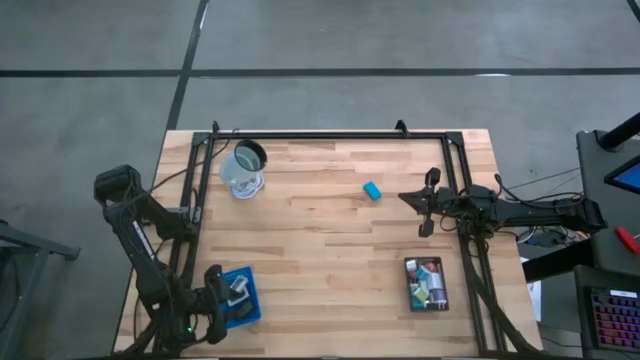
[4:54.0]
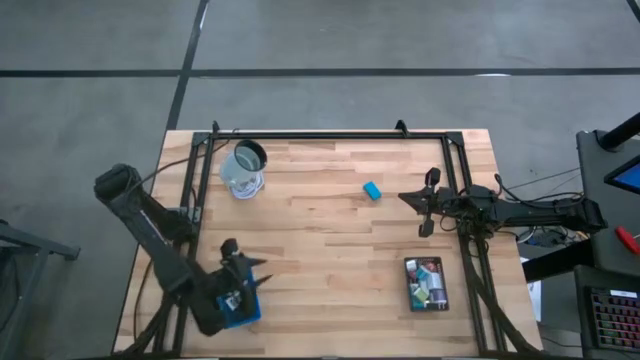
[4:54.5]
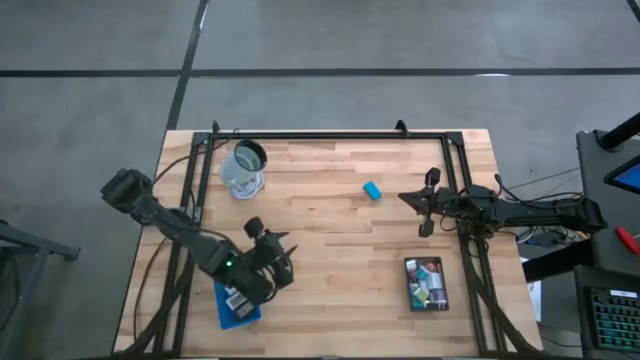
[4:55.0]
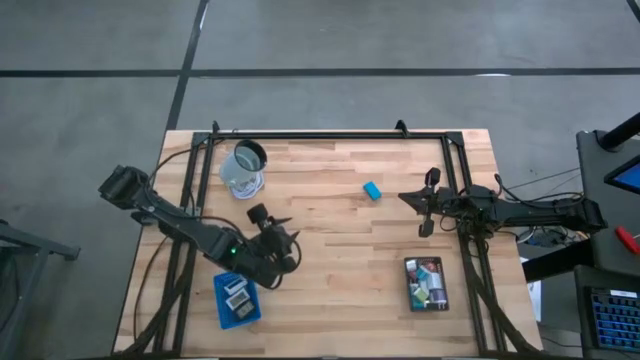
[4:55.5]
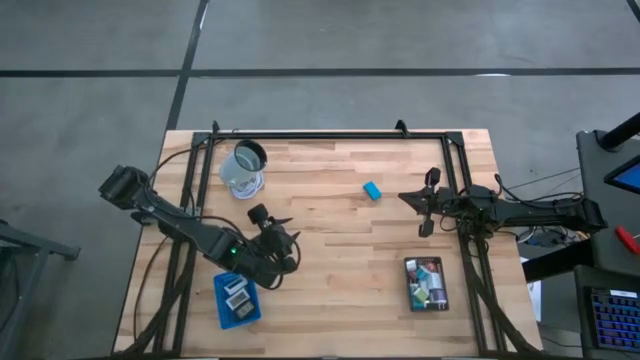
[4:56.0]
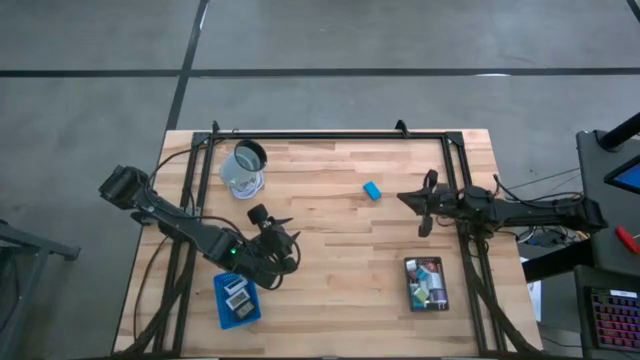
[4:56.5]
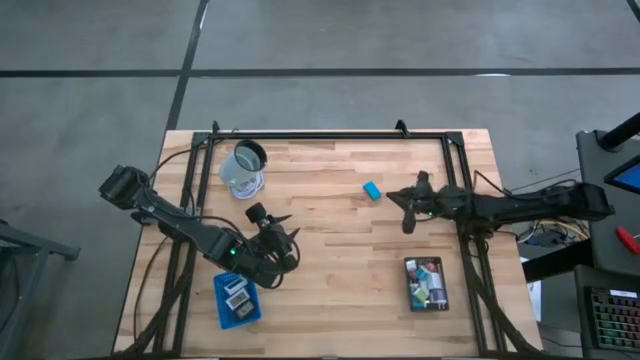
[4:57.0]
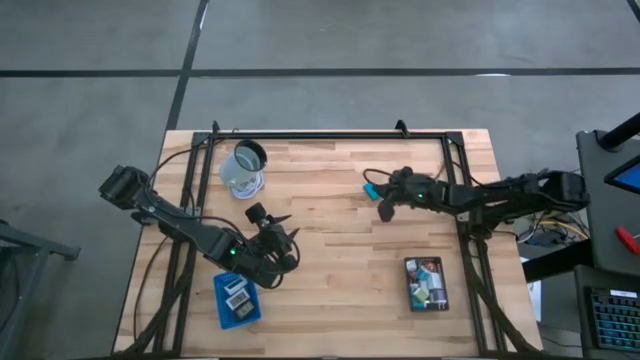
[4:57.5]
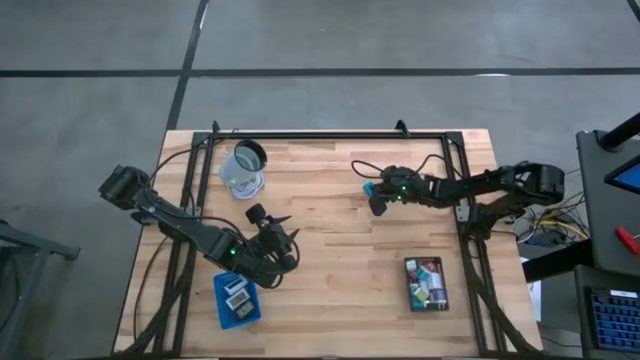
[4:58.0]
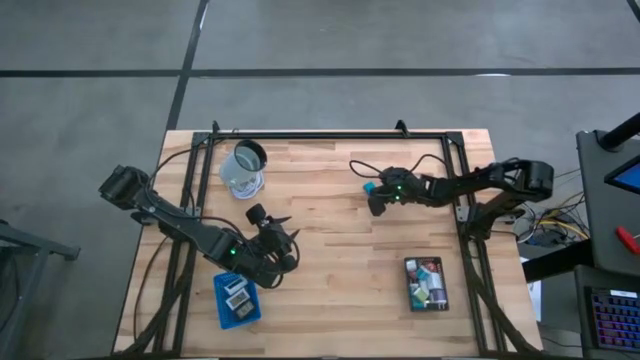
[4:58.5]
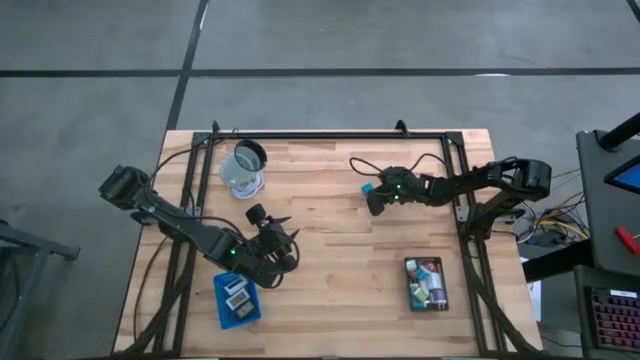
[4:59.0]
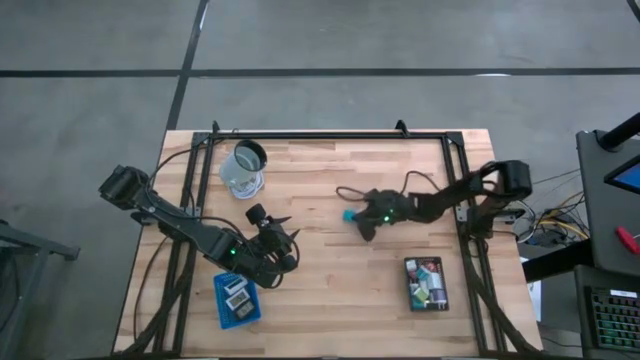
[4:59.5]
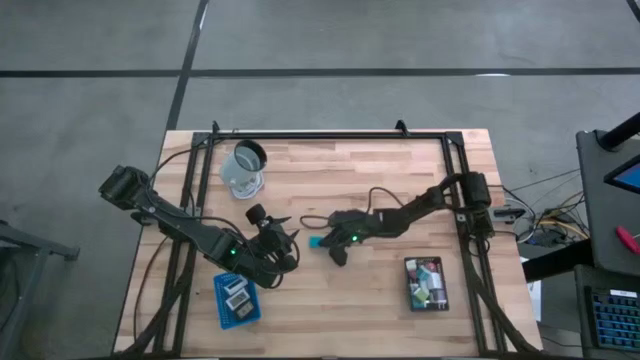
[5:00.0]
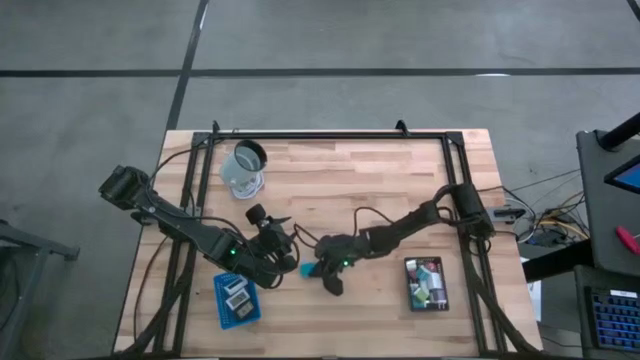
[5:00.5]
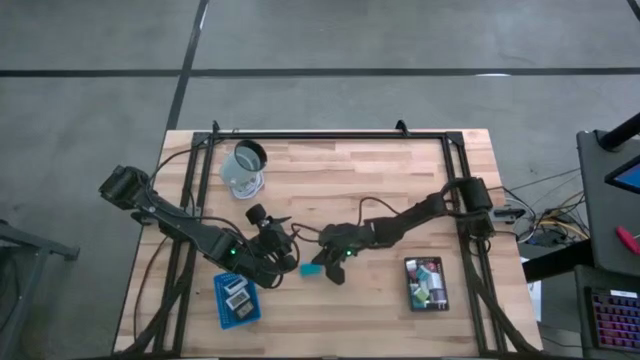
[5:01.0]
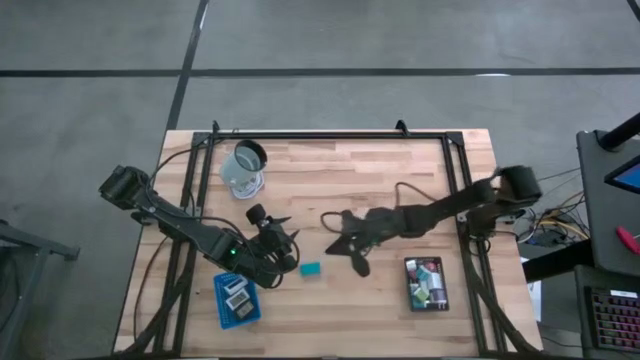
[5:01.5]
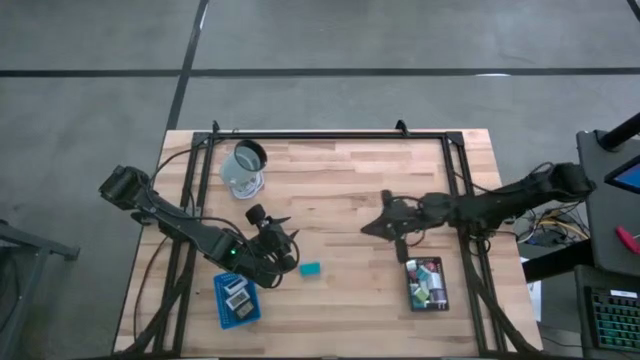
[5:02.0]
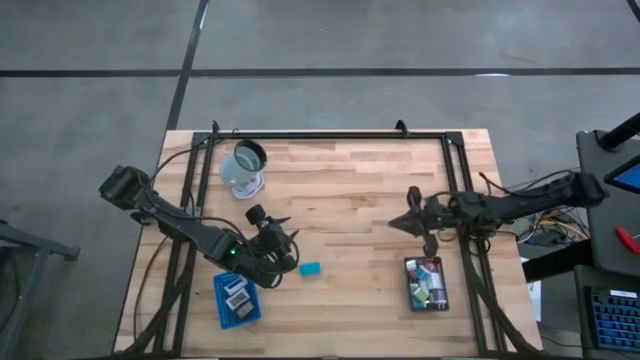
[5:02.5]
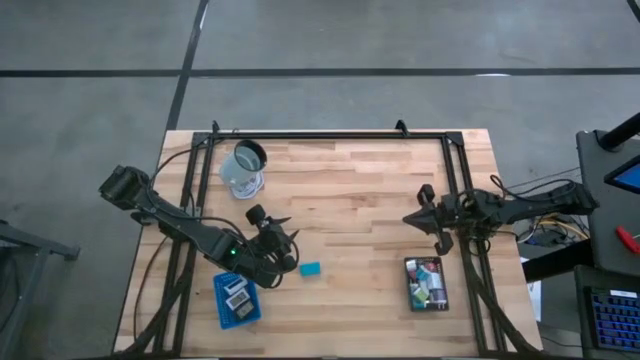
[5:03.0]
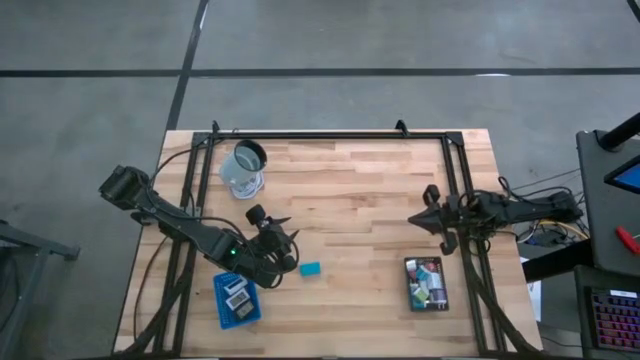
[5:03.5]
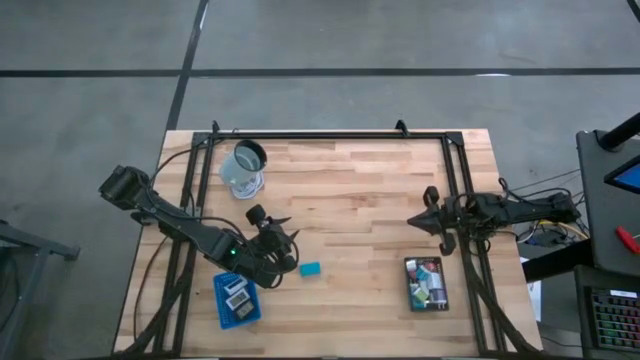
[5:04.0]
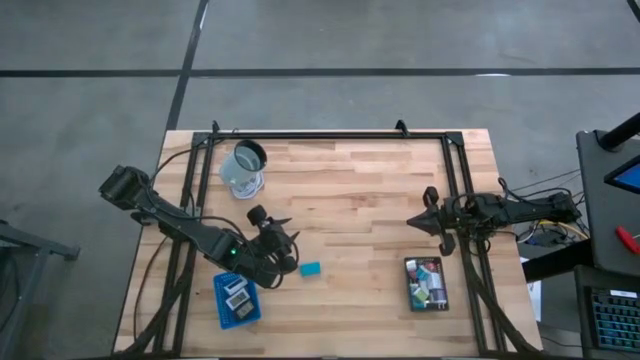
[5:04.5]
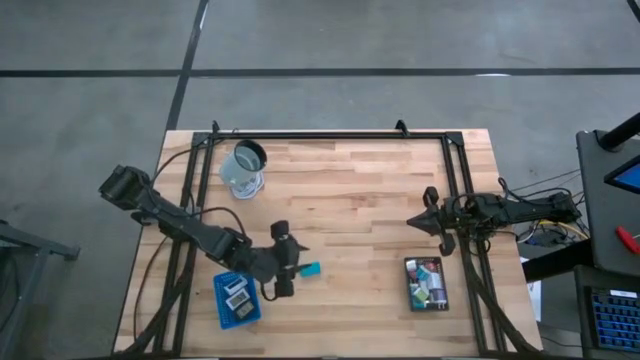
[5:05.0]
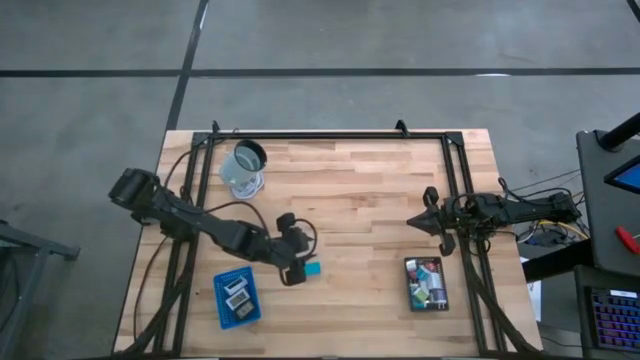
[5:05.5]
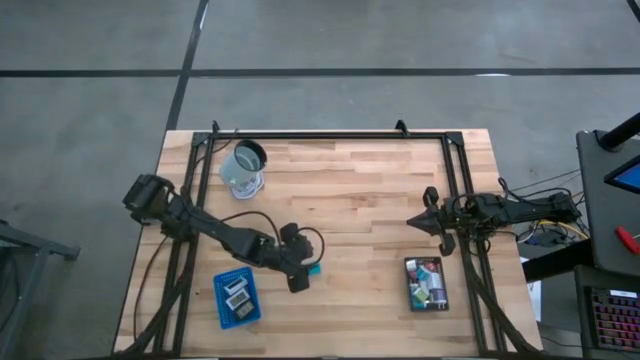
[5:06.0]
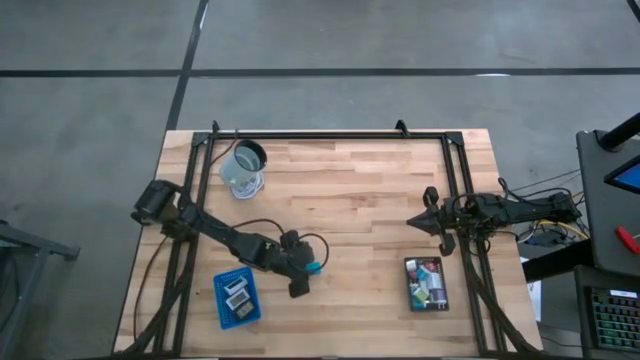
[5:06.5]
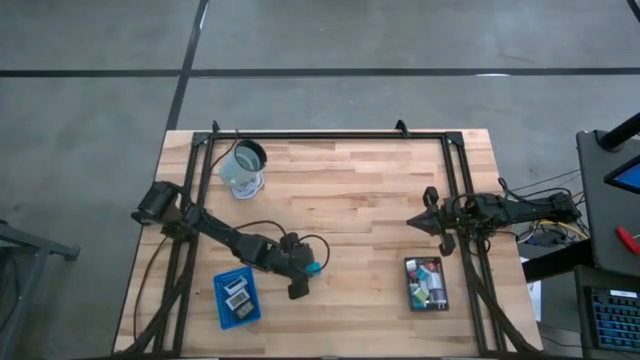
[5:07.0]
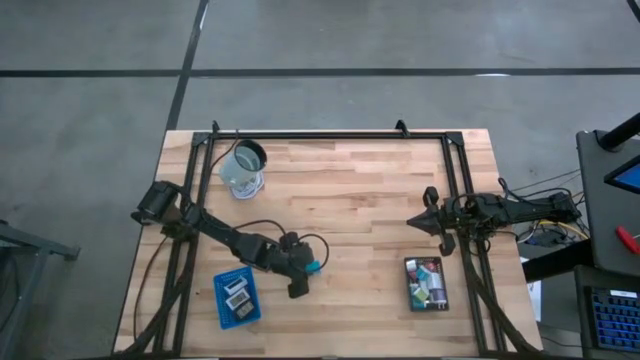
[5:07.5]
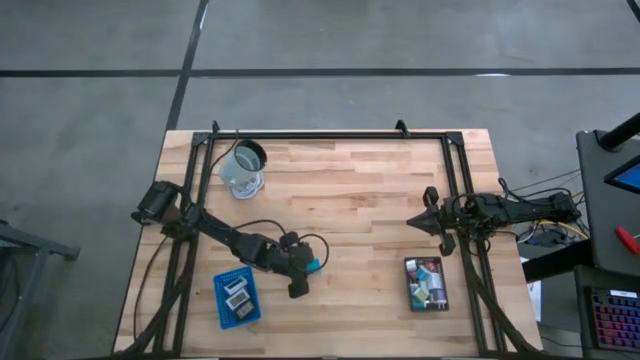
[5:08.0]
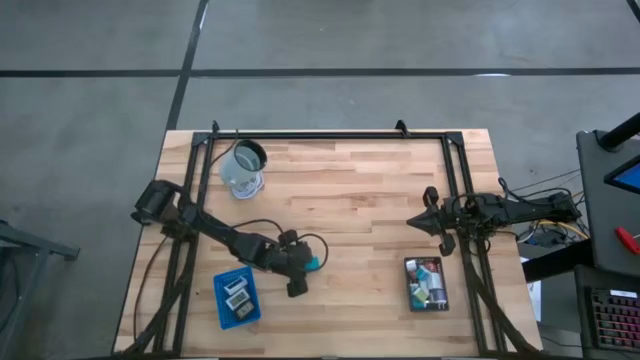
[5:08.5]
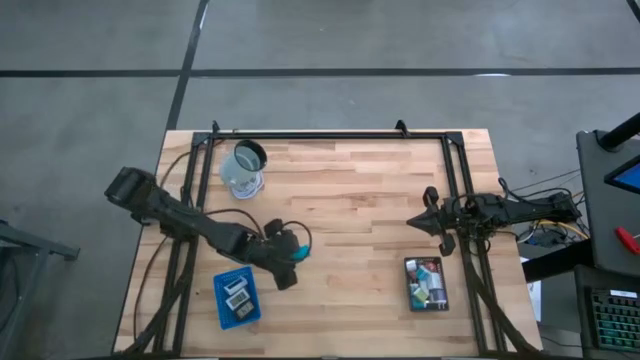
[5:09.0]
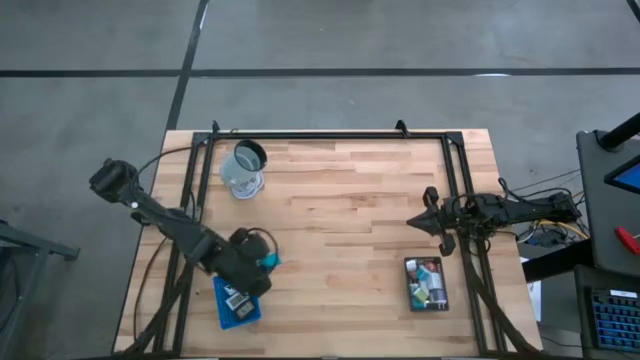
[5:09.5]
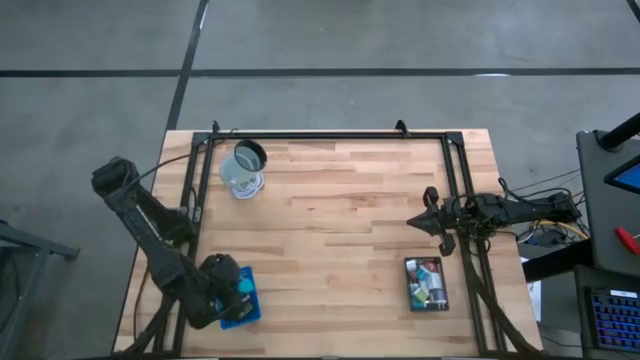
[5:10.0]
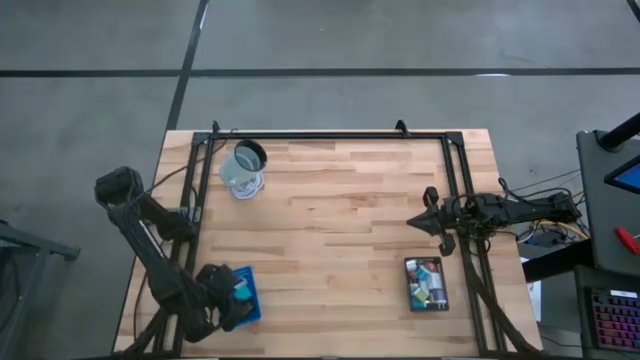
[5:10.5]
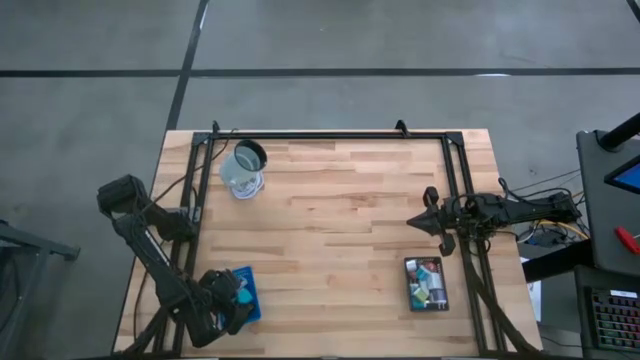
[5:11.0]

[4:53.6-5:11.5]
Task: Pick & Place Office items
Put the light blue digital clock into the blue bin

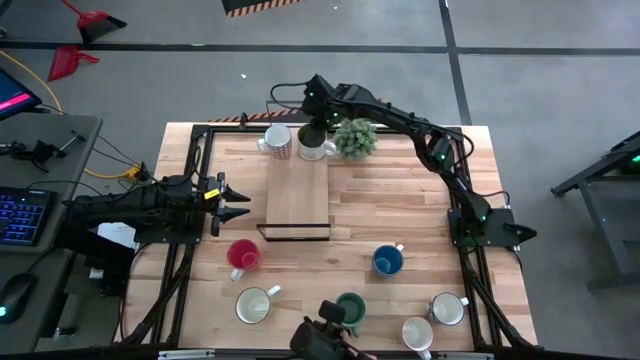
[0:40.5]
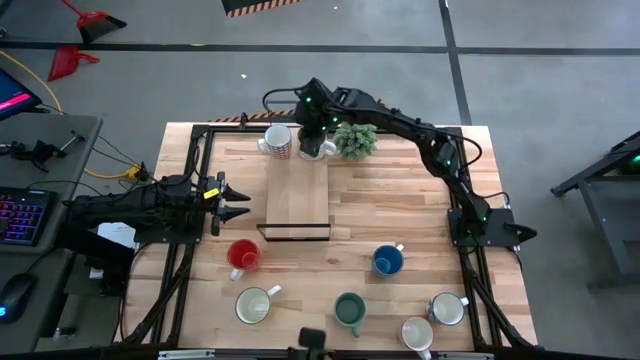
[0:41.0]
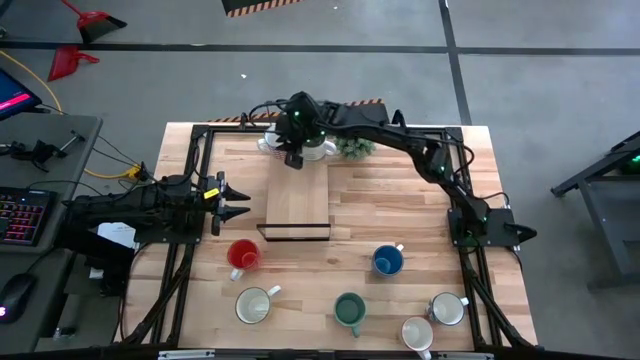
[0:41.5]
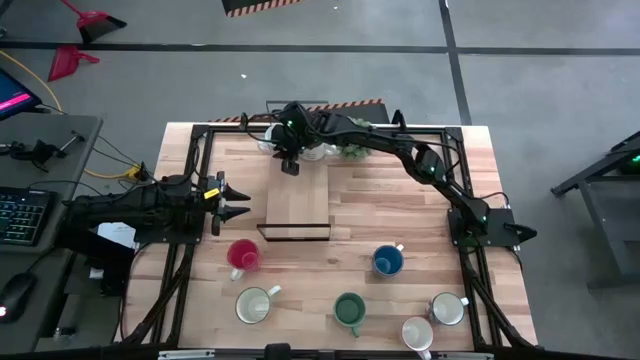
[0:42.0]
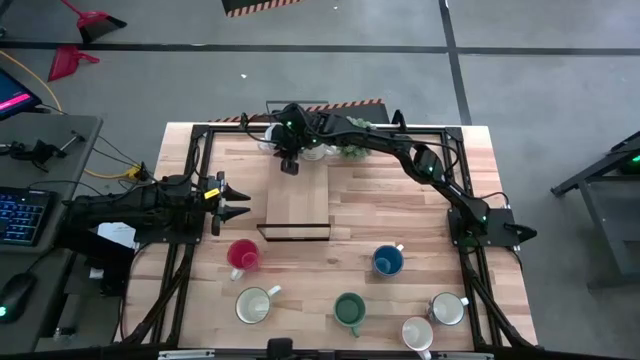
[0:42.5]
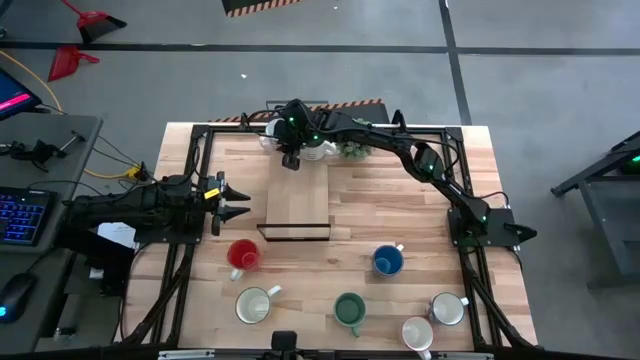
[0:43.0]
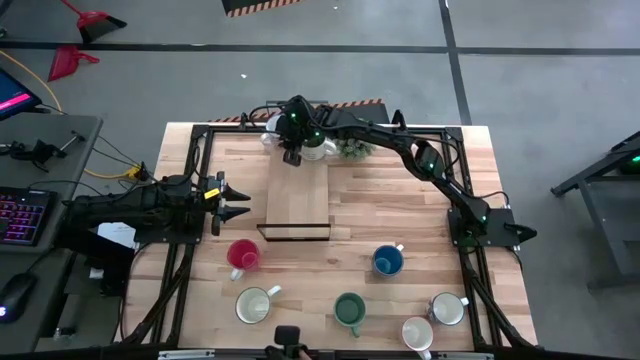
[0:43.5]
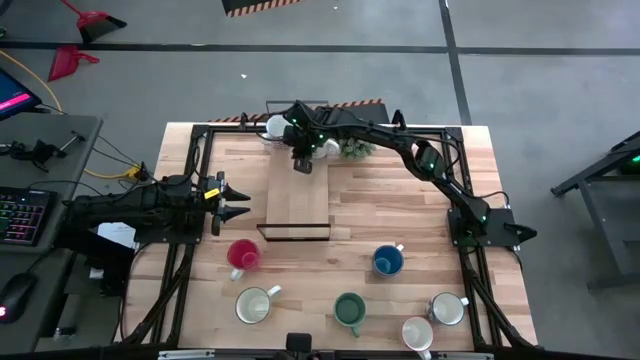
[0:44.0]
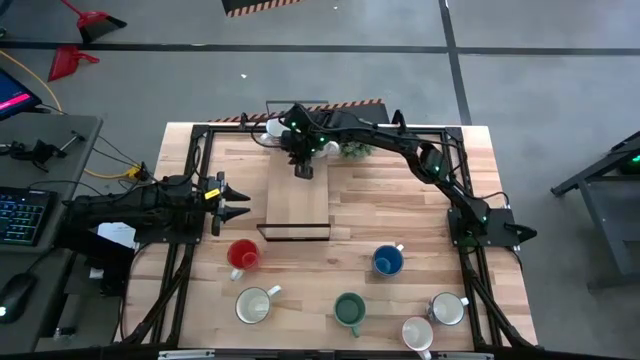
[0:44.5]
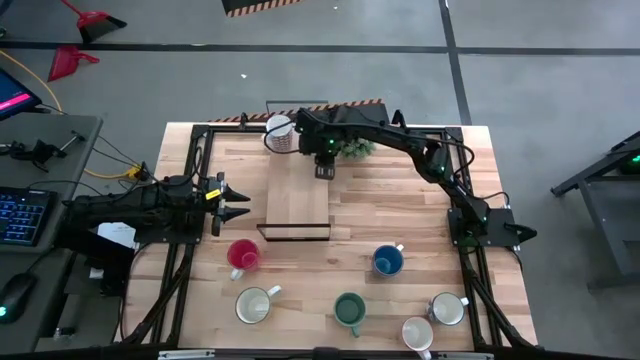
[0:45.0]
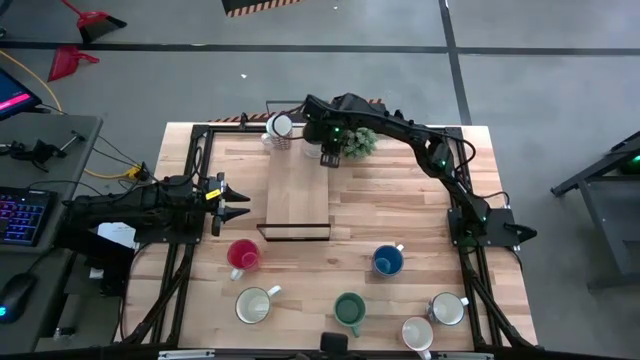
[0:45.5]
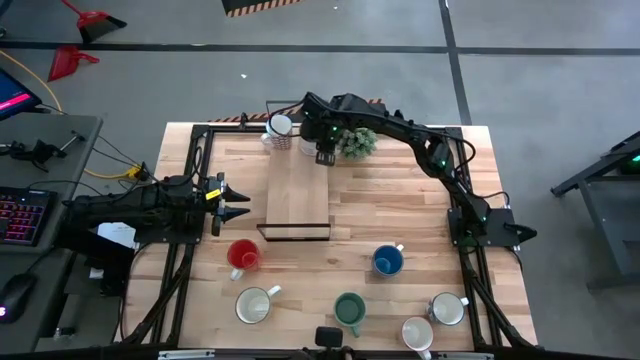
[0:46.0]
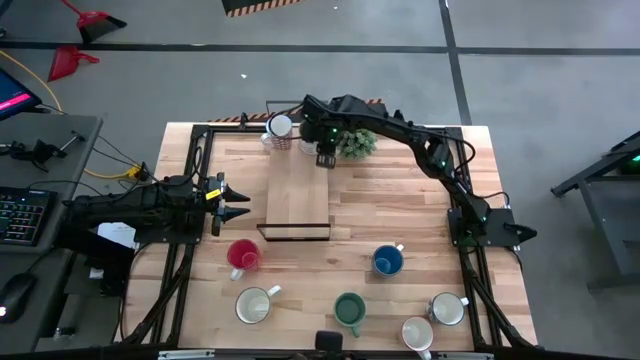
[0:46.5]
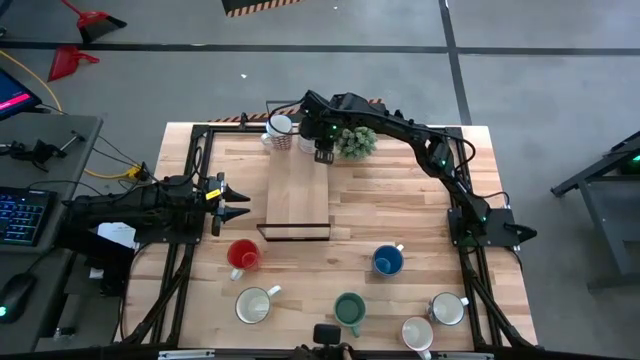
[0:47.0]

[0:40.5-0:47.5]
Task: Place coffee mugs
Adjust the mugs on the shelf
